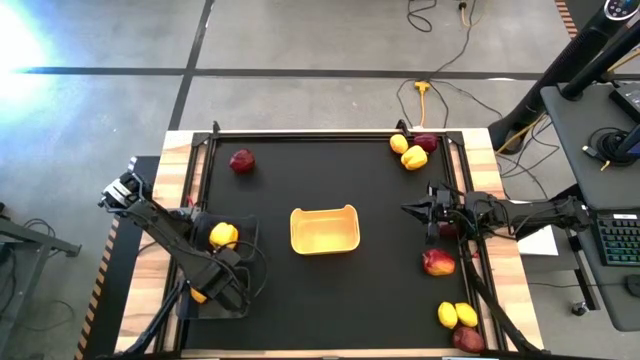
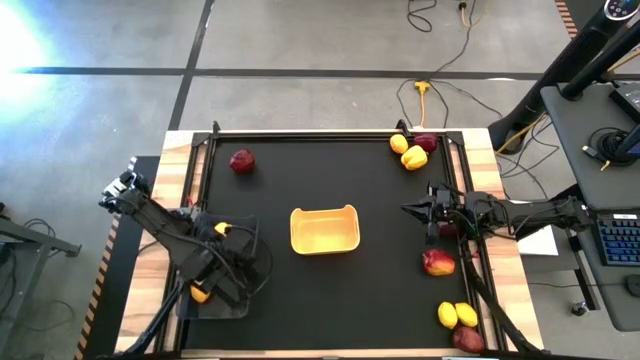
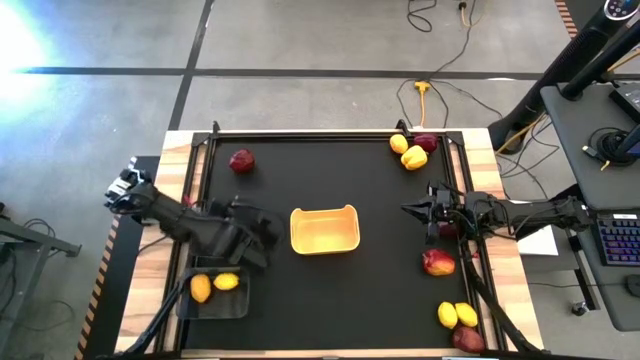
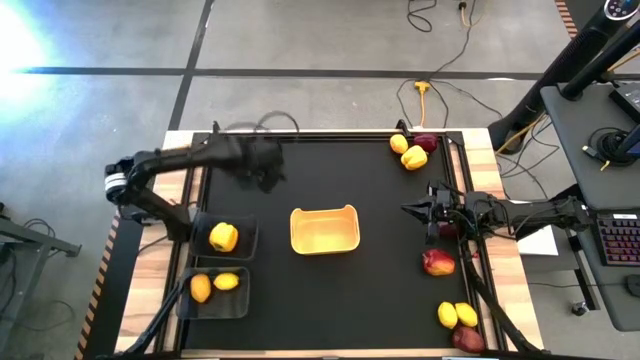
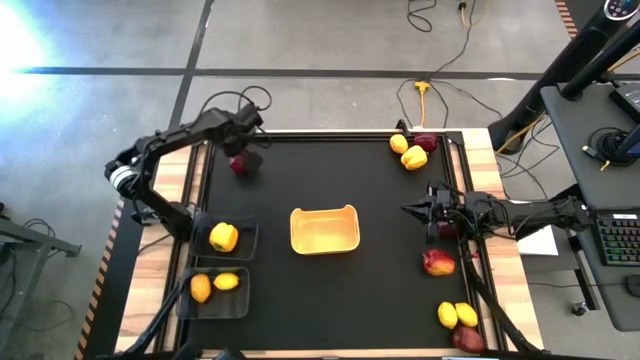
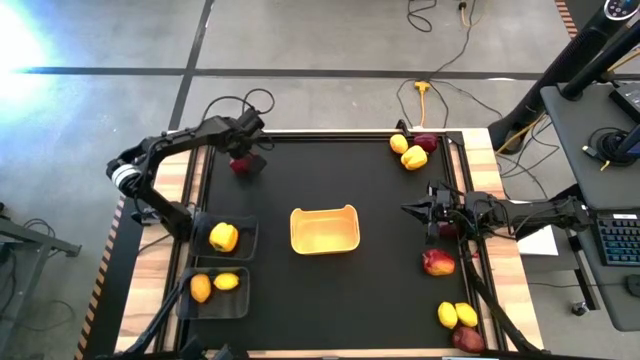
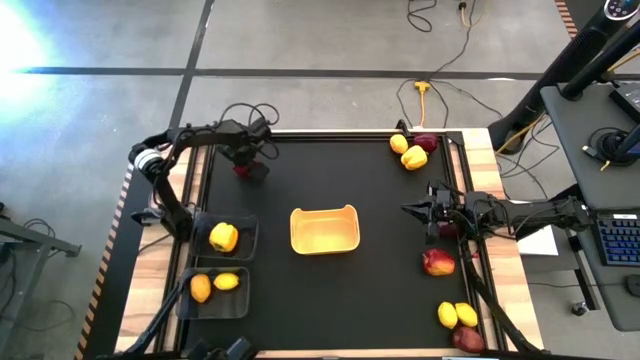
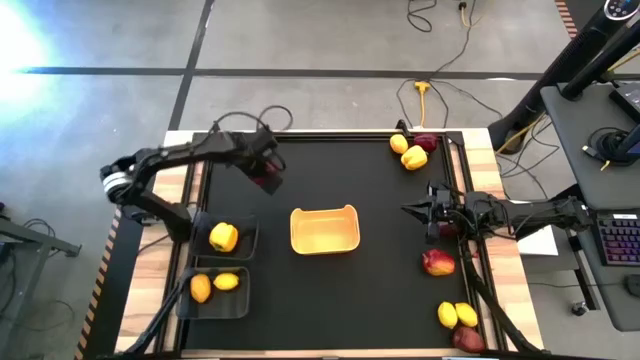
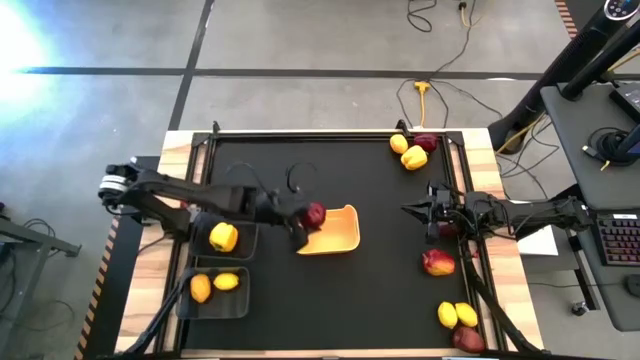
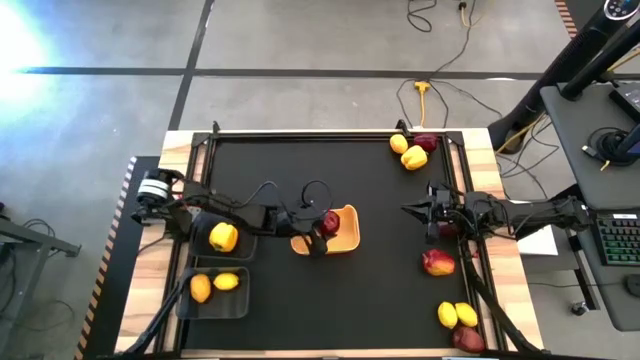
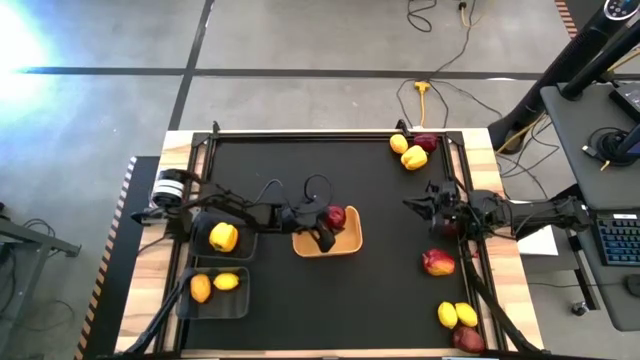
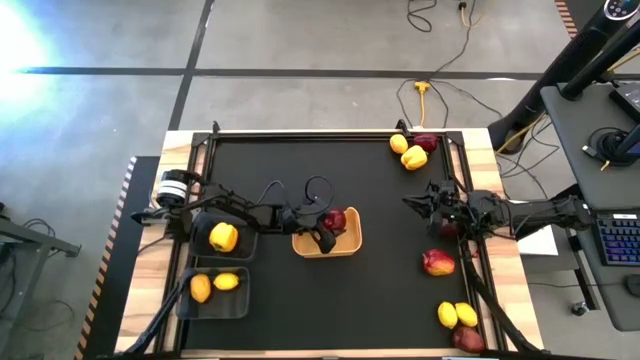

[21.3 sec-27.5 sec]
Task: Sort produce into baskets
Put the red apple into the yellow bin

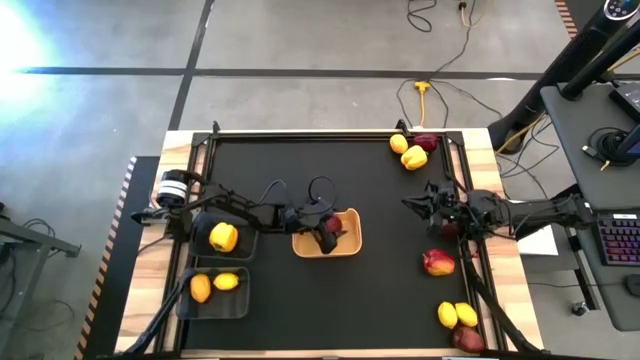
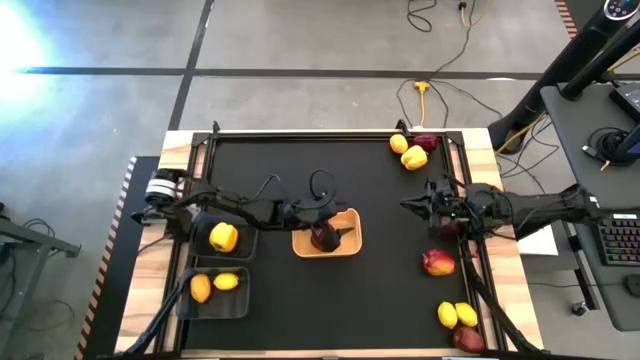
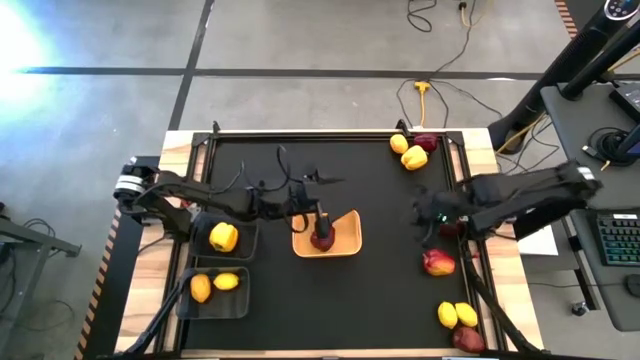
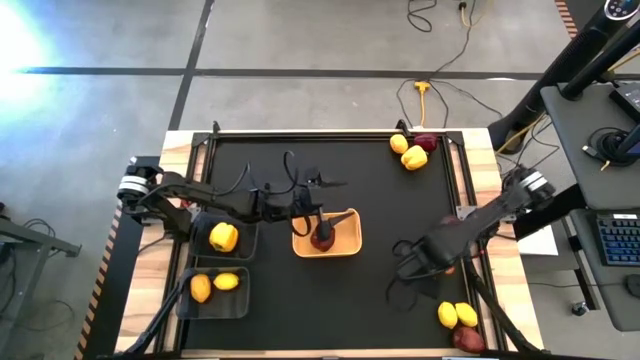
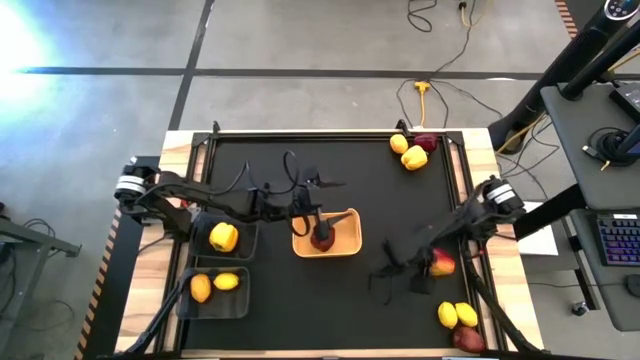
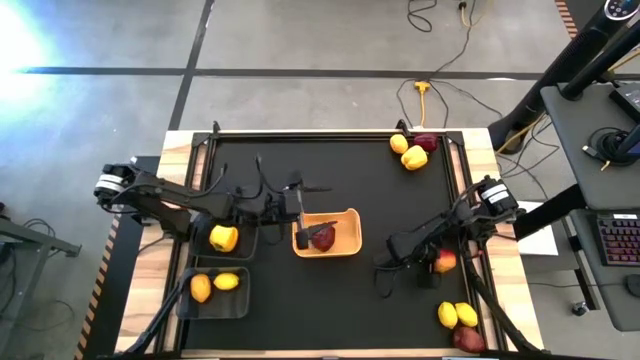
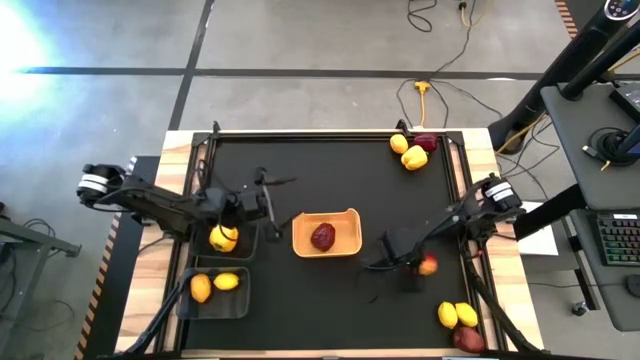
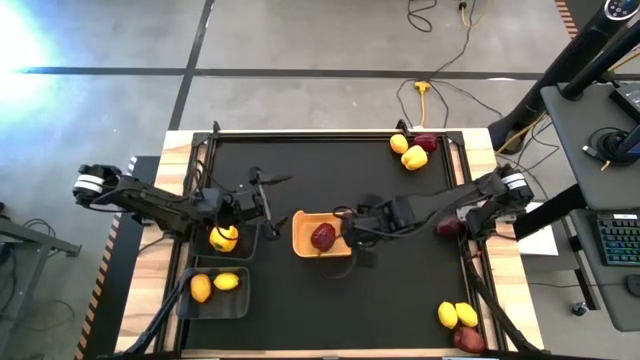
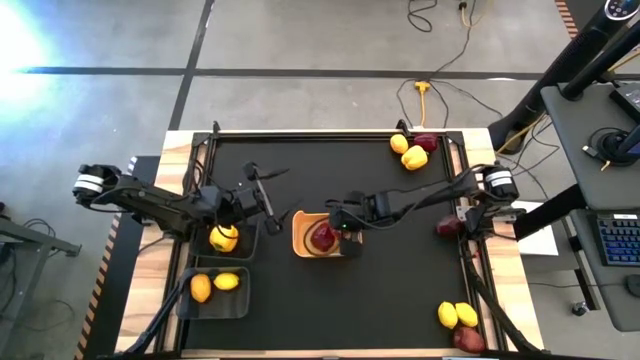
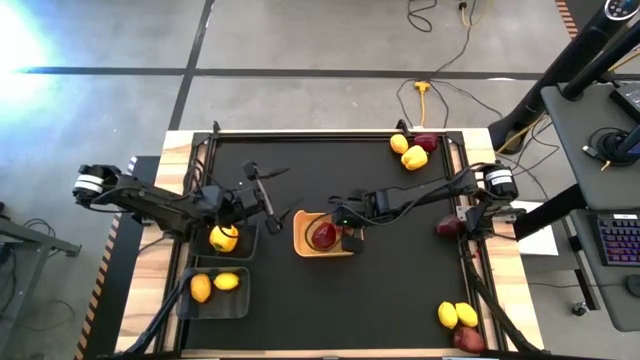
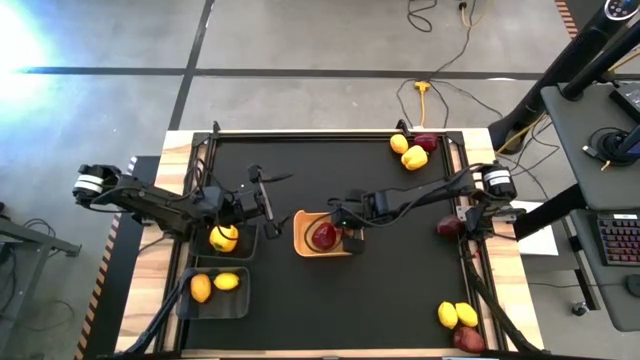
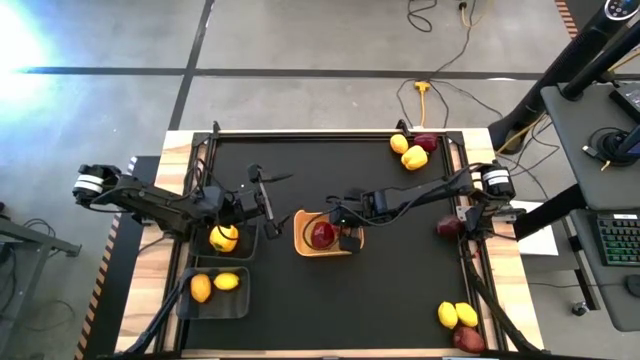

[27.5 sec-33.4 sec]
Put the red apple into the yellow bin

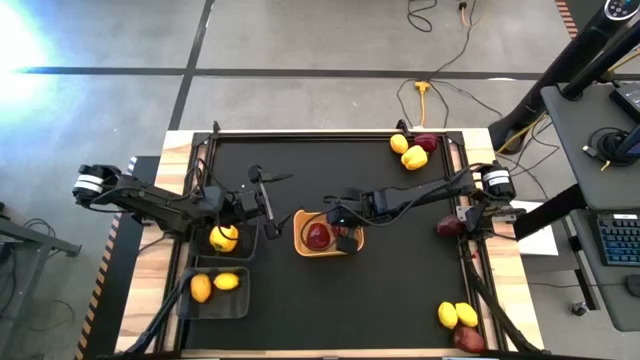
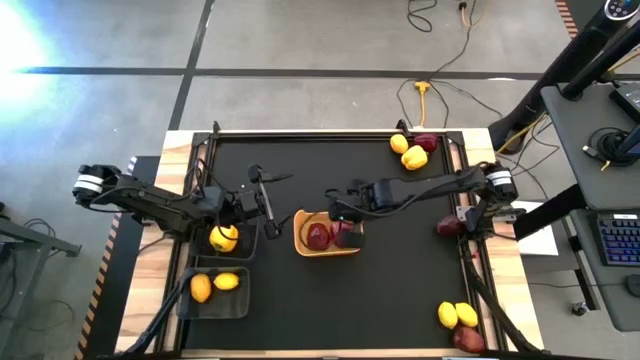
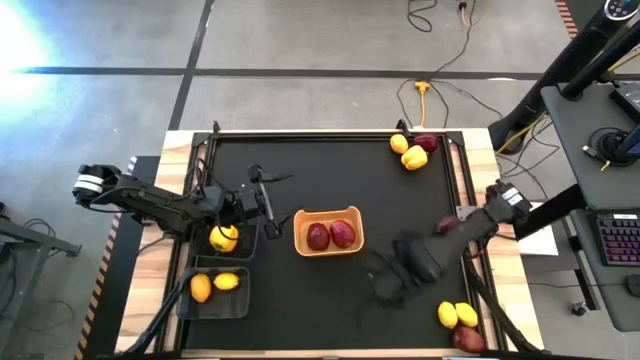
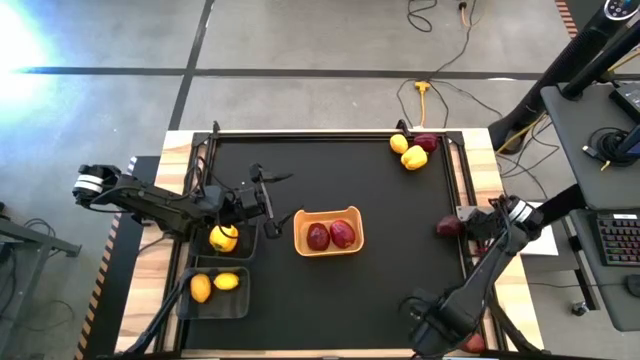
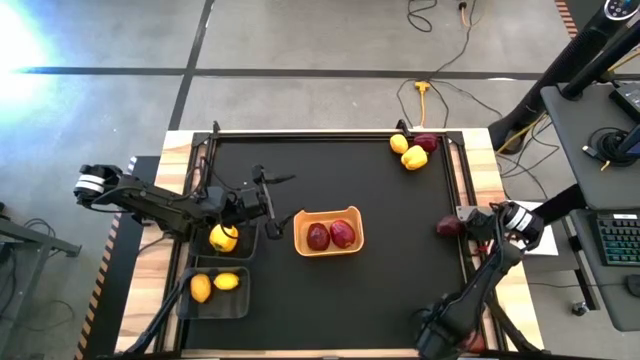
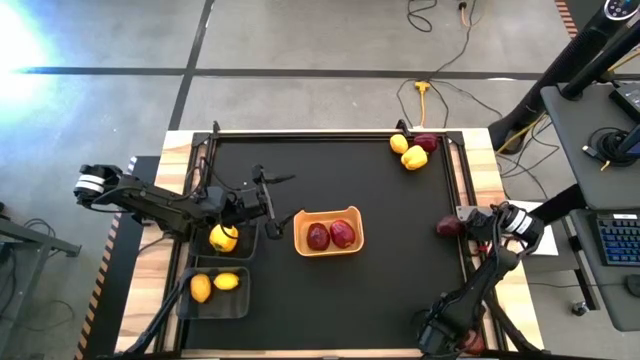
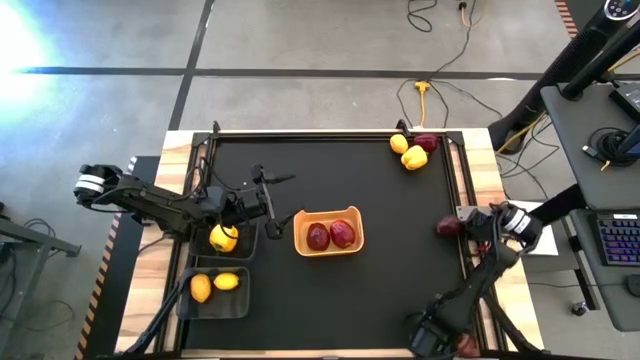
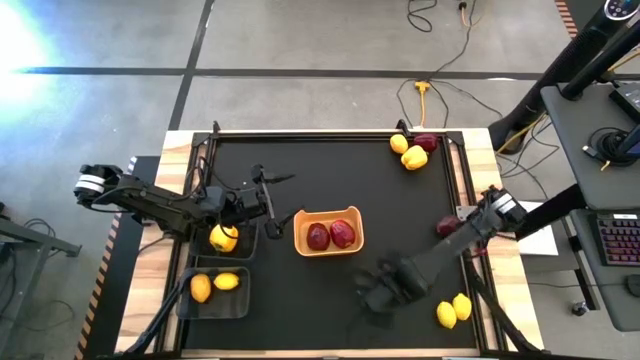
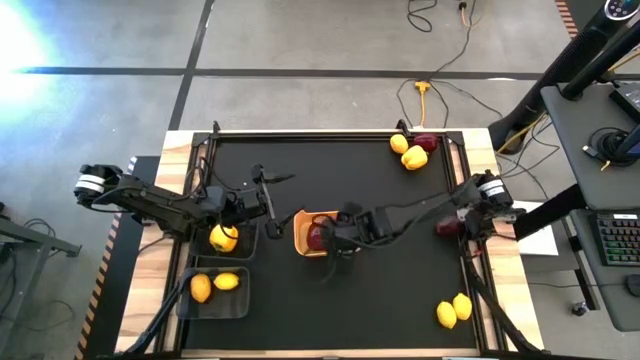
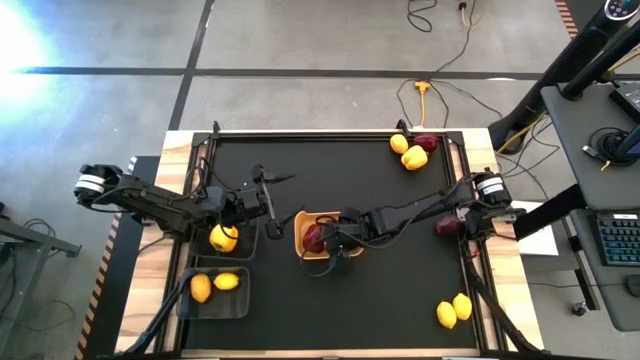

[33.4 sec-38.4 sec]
Put the red apple into the yellow bin

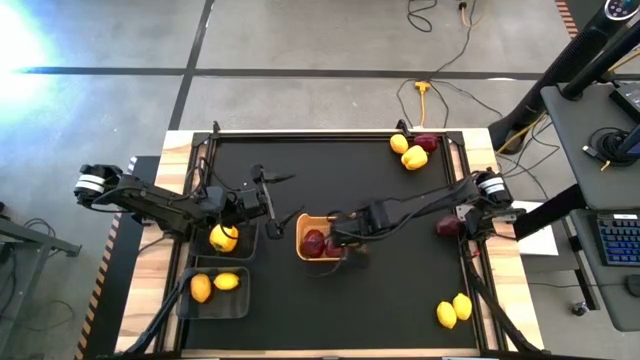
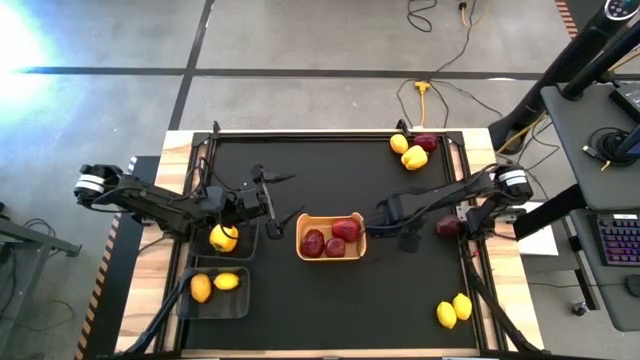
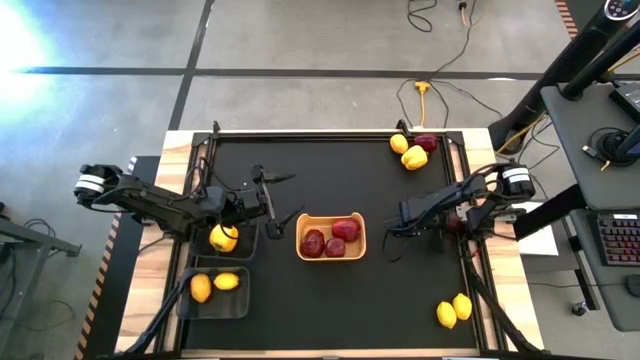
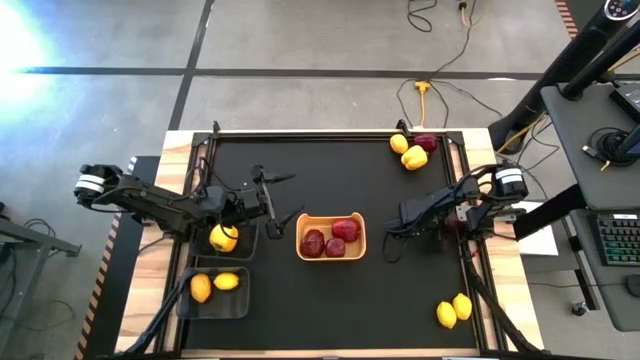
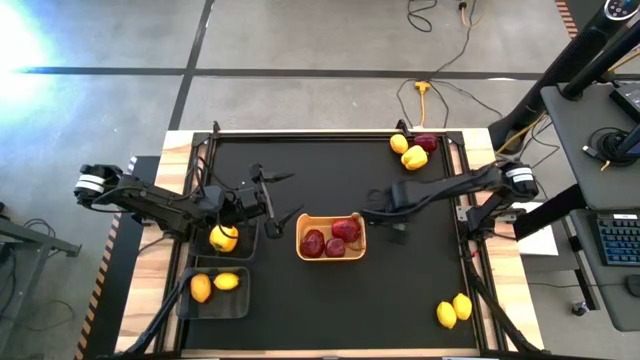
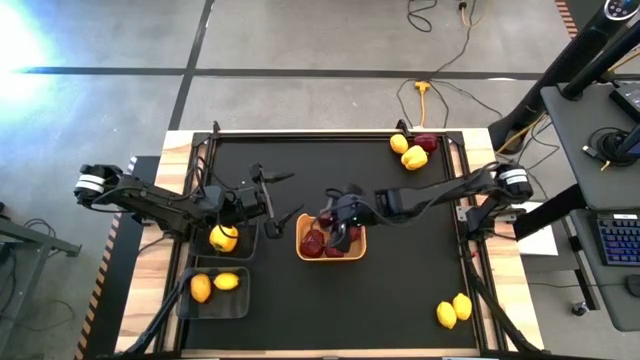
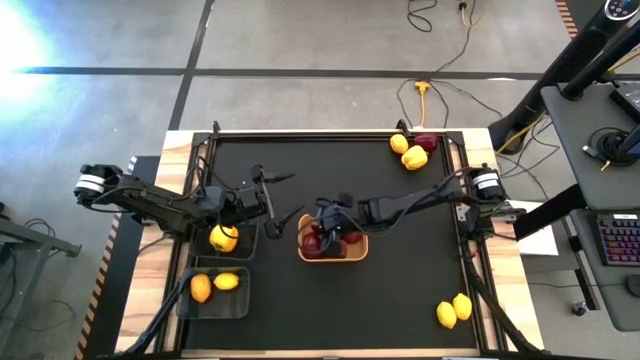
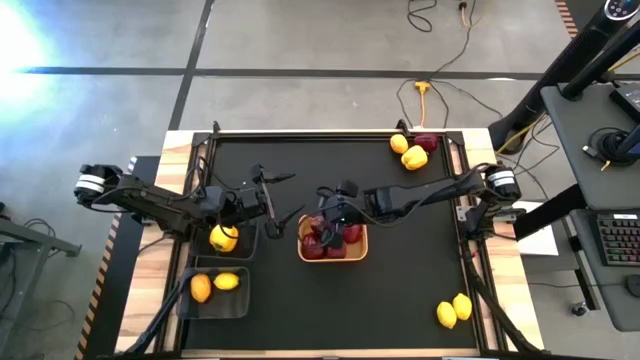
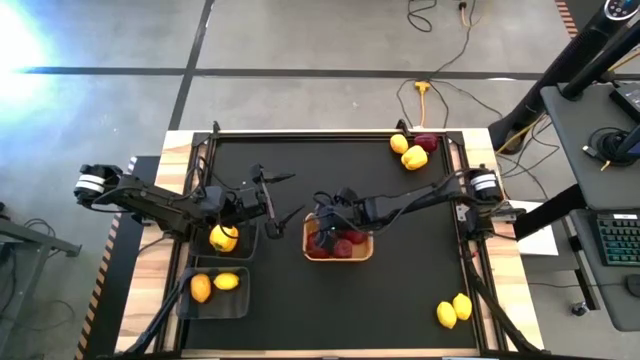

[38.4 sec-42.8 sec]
Put the red apple into the yellow bin
